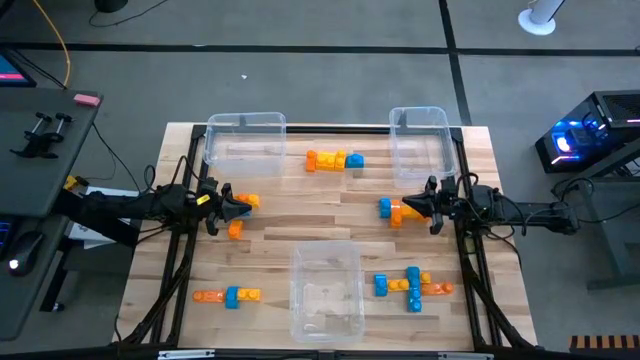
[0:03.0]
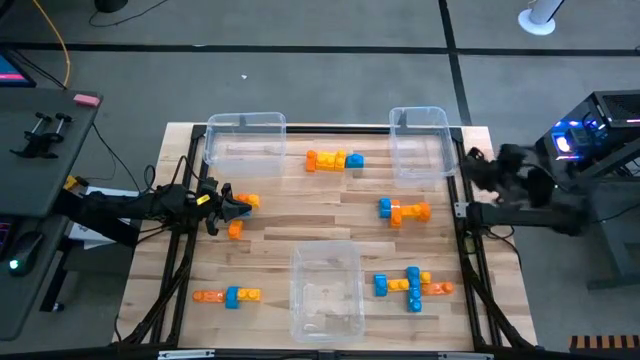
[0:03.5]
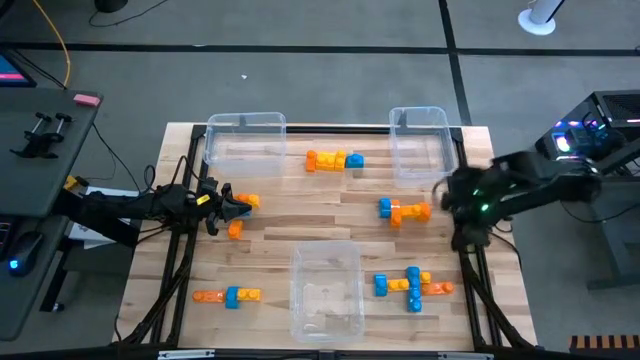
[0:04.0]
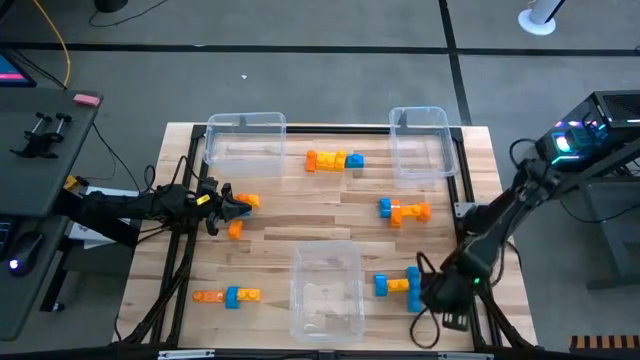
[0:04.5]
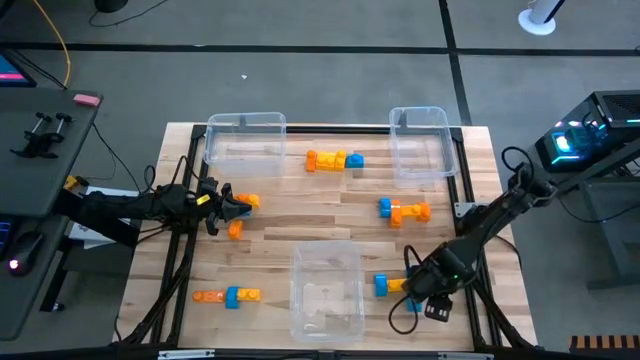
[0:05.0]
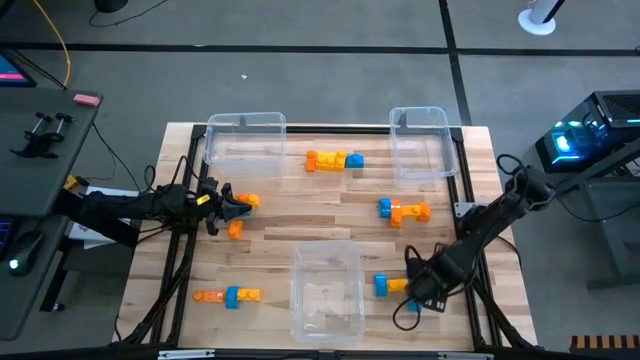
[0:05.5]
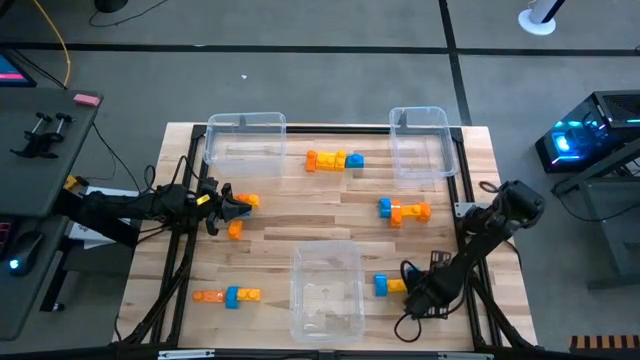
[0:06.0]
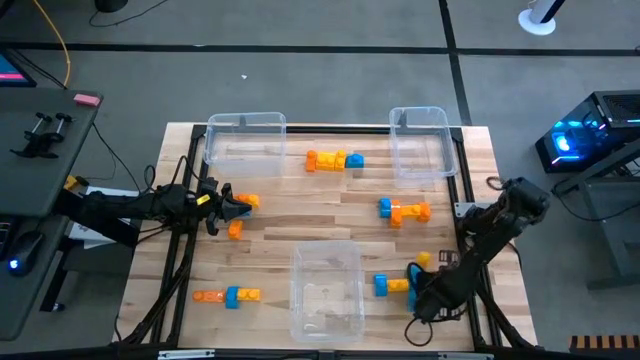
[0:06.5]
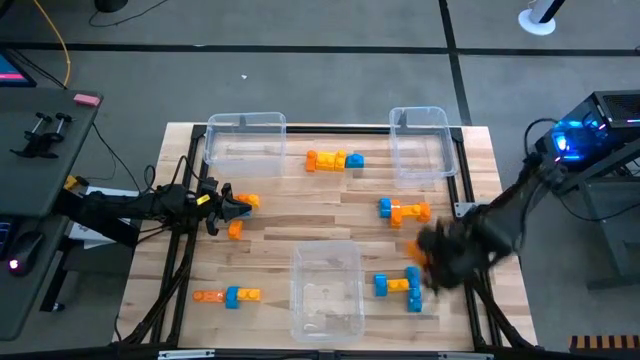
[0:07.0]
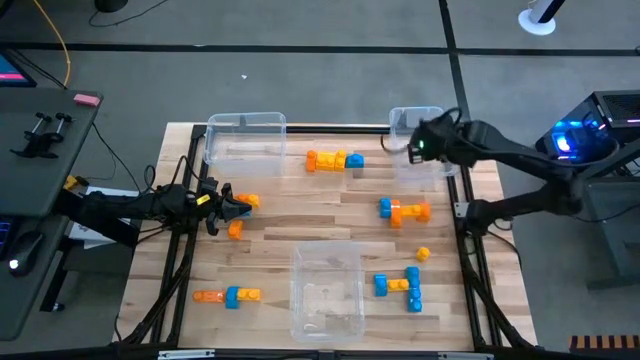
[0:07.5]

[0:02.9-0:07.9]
Task: Sort blocks
Put the orange game piece into the top right transparent bin

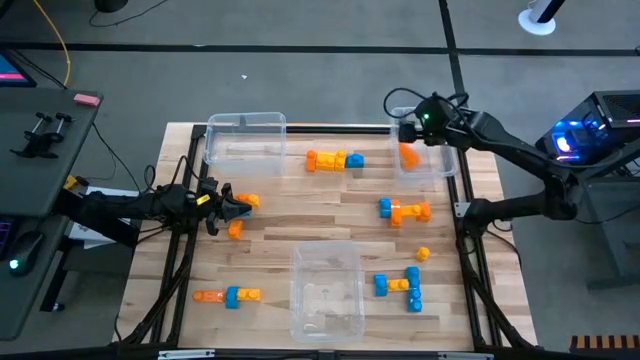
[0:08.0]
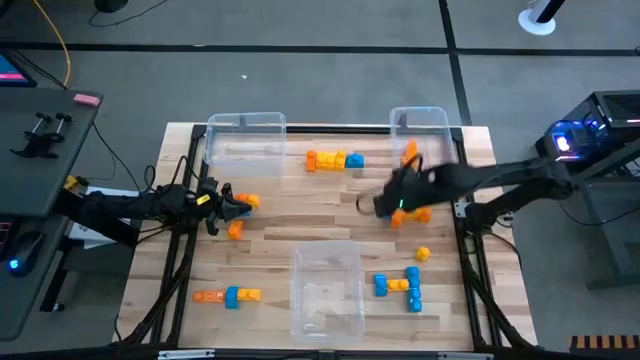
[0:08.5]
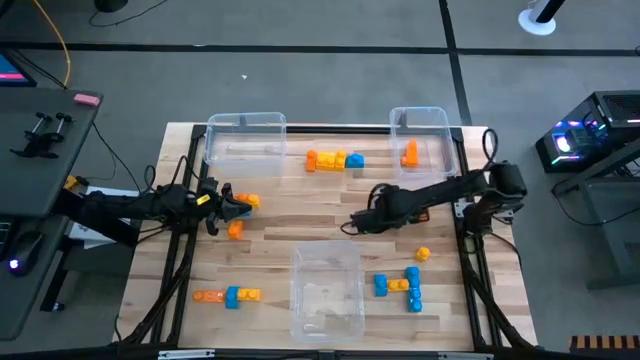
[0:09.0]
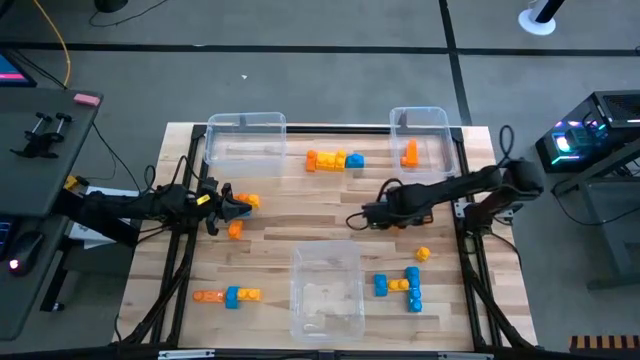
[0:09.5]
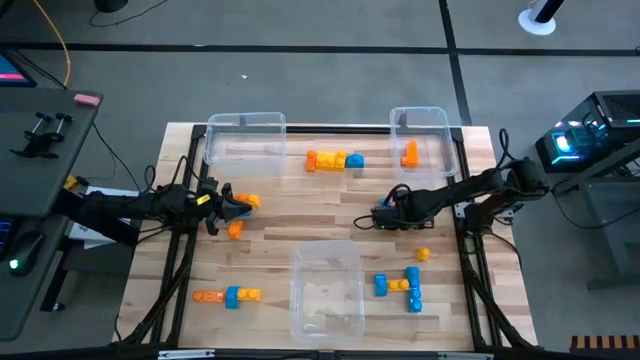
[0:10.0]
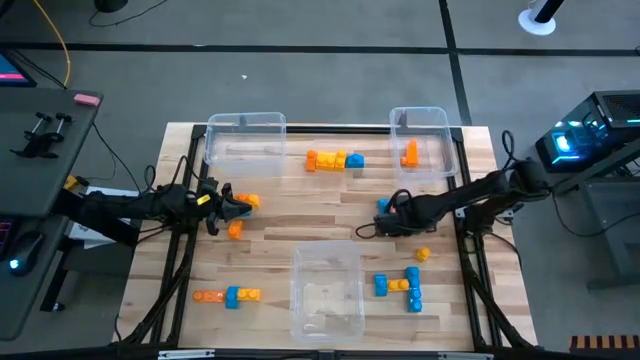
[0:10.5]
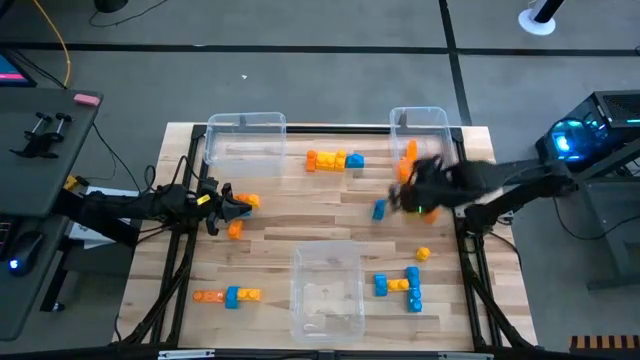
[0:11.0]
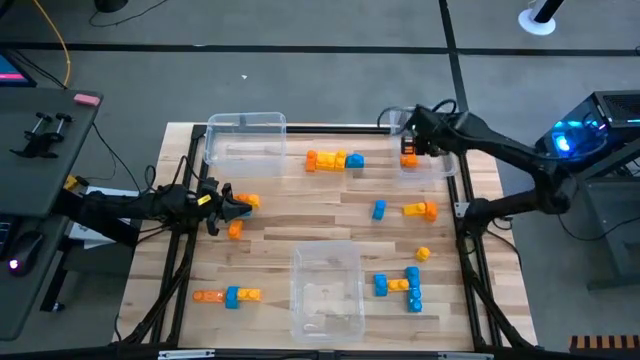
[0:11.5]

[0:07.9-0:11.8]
Put the orange game piece into the top right transparent bin

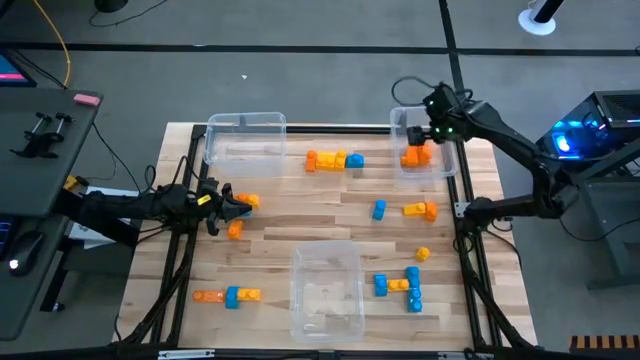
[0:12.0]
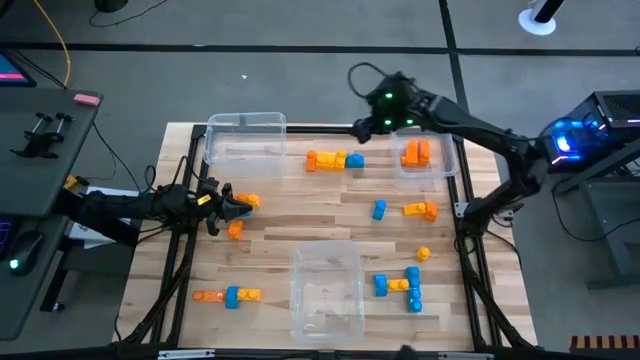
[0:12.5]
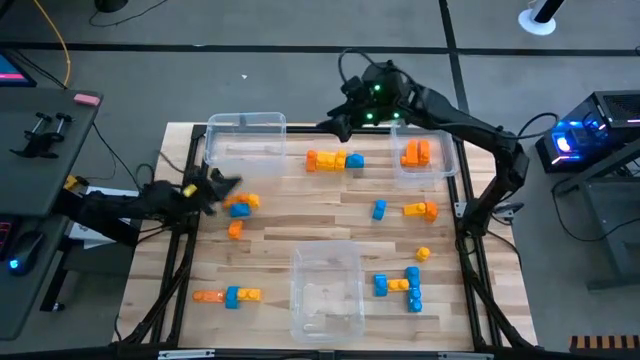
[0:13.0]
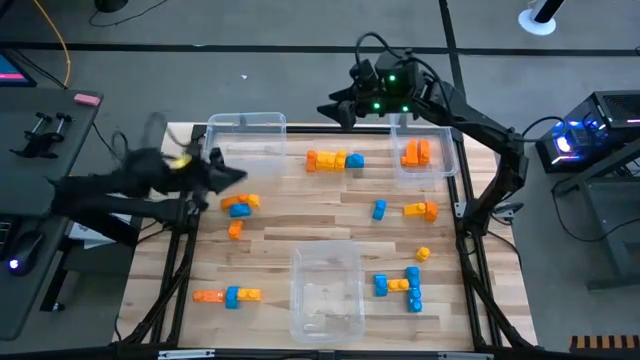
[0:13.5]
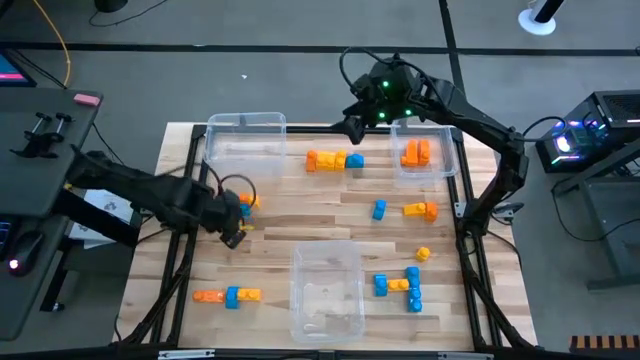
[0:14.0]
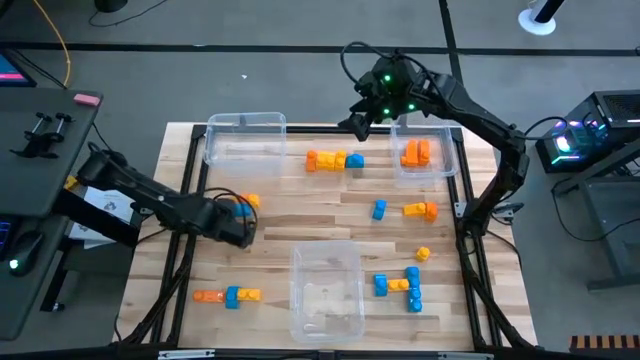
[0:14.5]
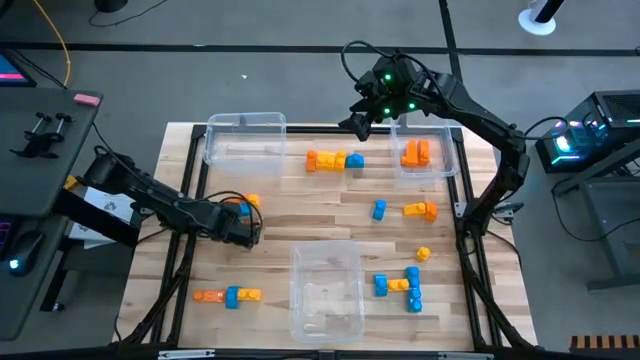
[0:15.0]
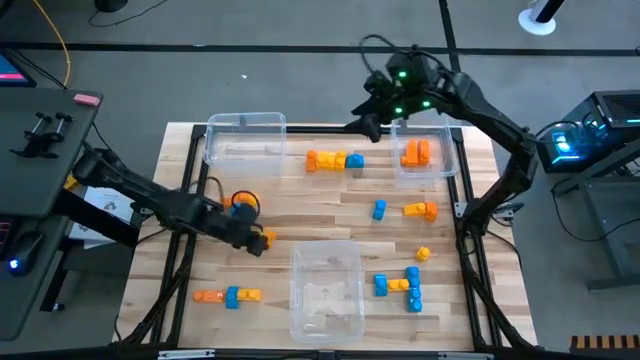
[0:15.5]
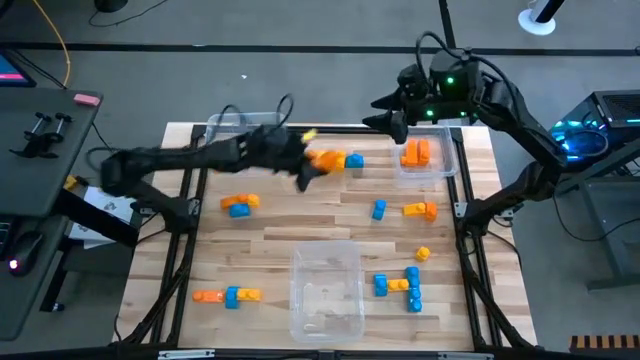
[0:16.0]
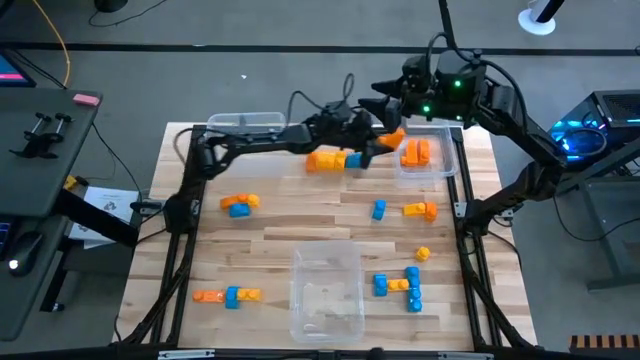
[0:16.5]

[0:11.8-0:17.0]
Put the orange game piece into the top right transparent bin

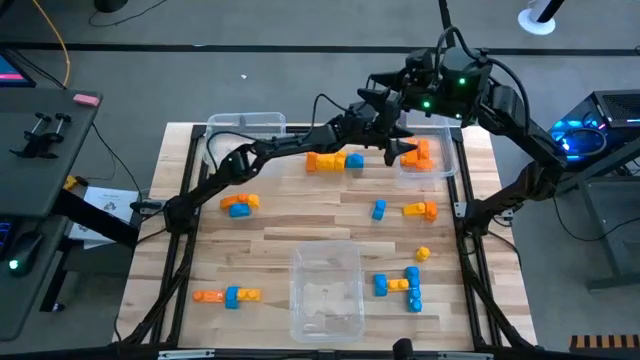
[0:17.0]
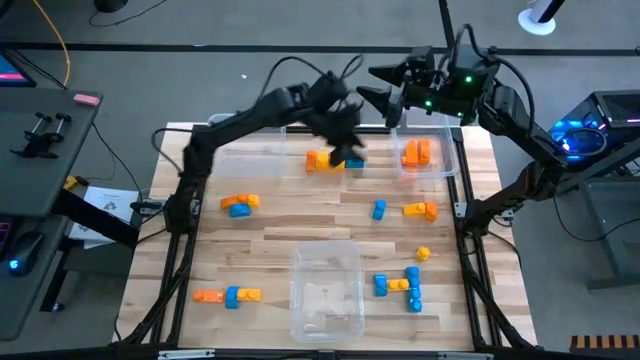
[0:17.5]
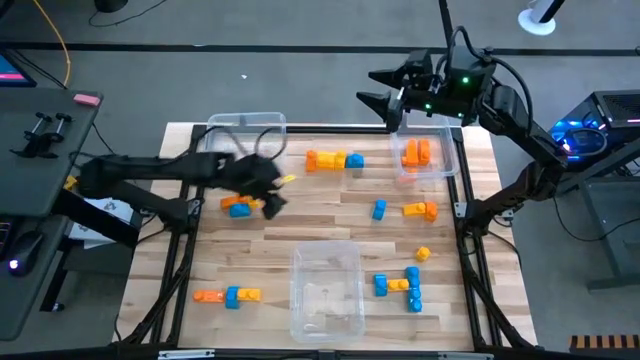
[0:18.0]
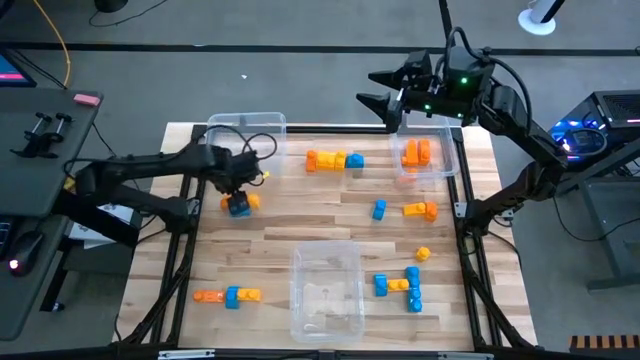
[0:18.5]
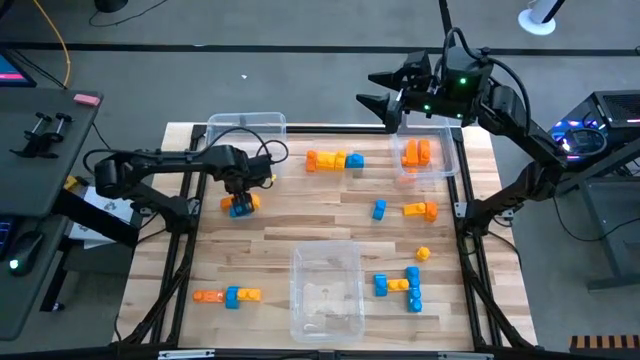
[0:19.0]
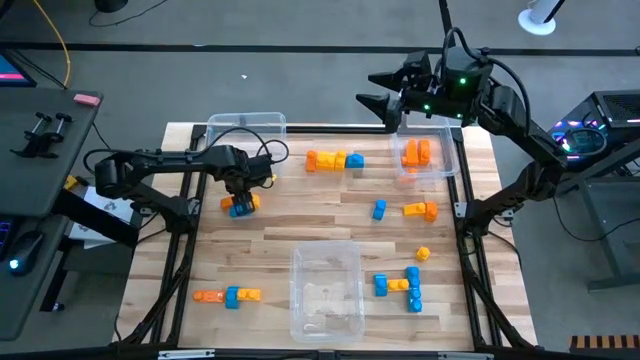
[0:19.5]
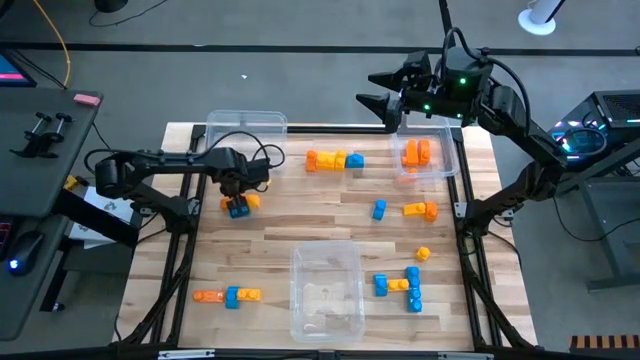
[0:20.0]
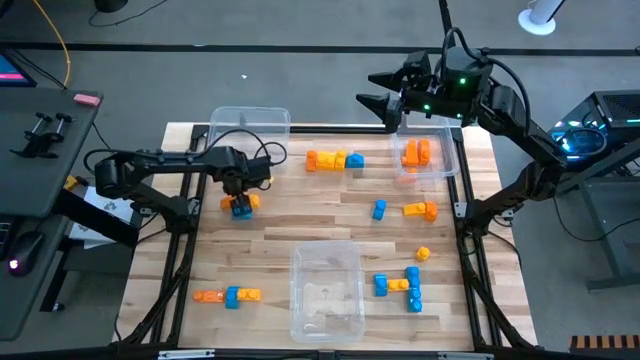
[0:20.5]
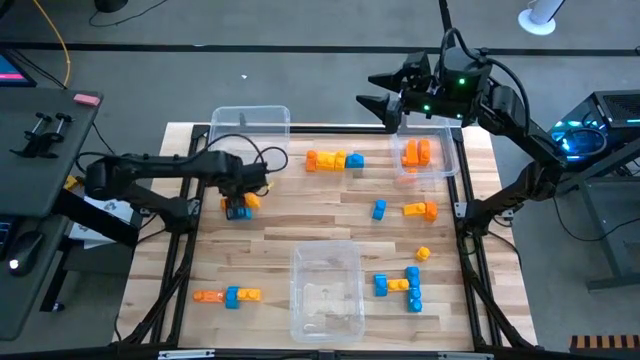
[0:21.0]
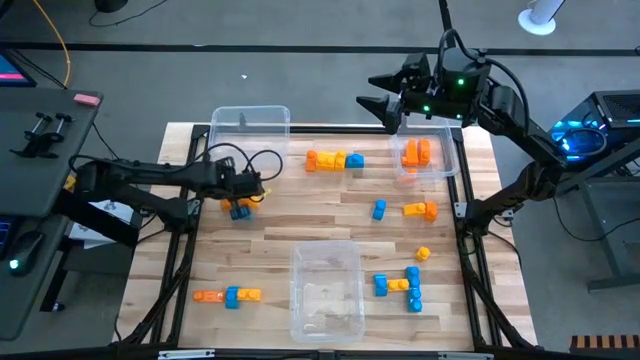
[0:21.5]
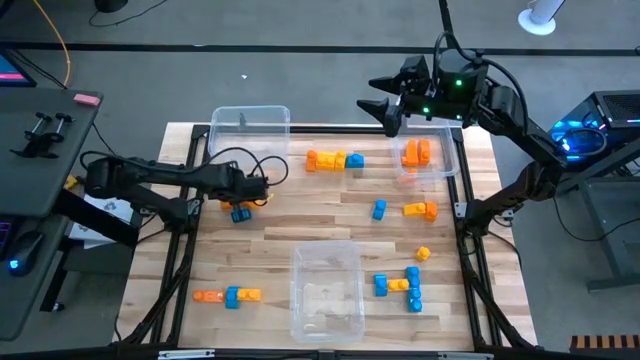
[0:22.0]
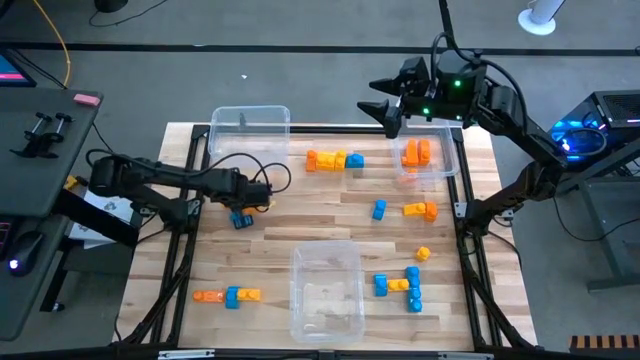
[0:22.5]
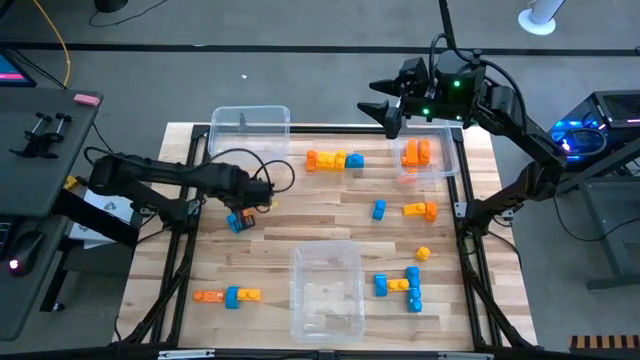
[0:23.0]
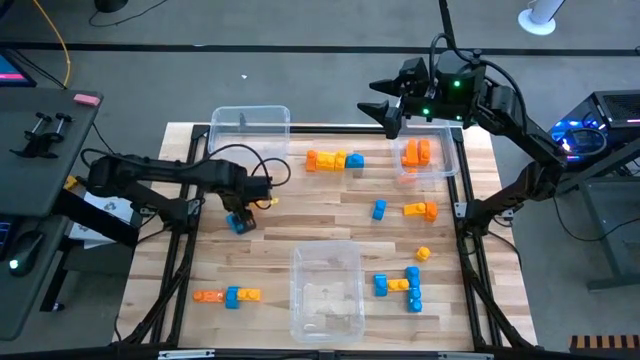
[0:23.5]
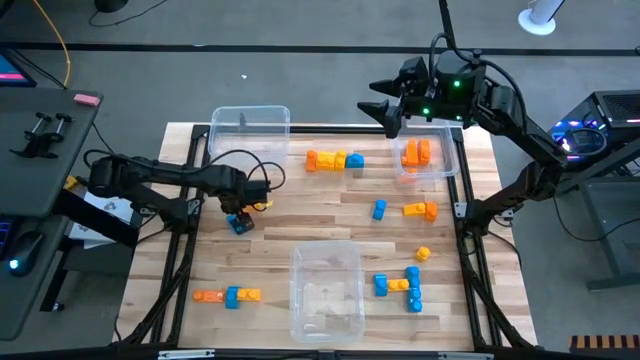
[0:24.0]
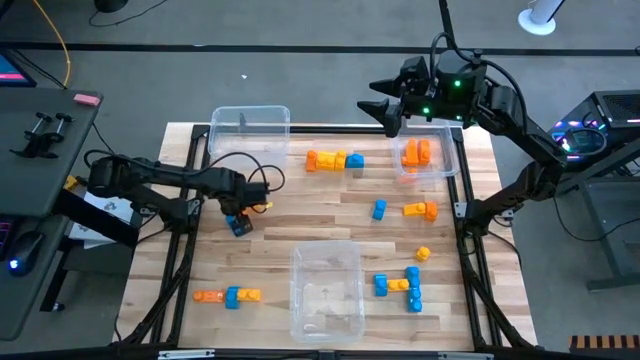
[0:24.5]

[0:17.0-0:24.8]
Put the orange game piece into the top right transparent bin
